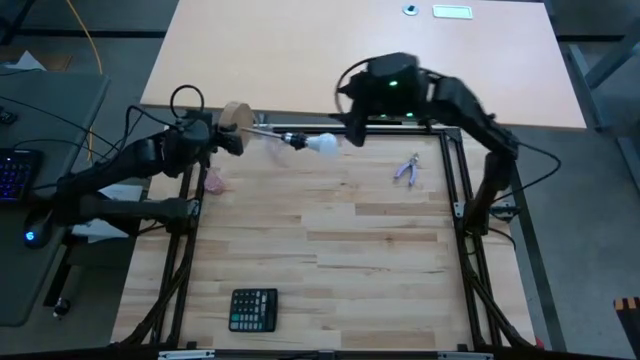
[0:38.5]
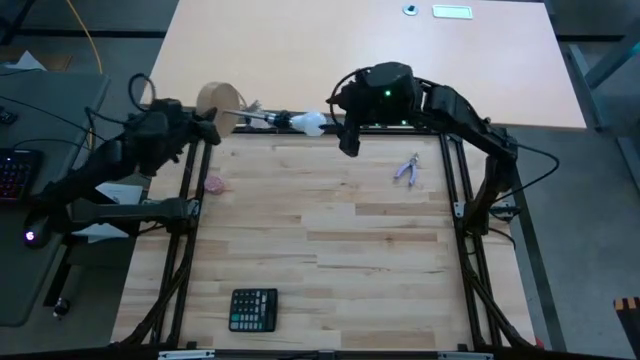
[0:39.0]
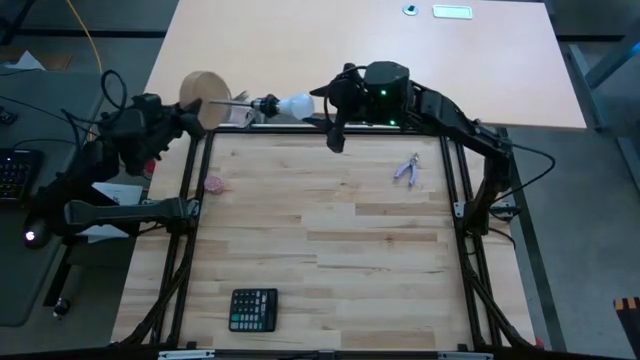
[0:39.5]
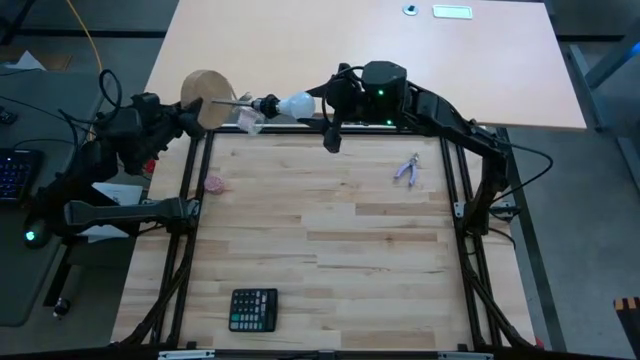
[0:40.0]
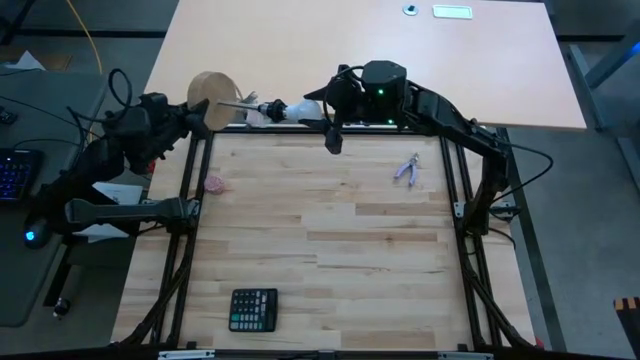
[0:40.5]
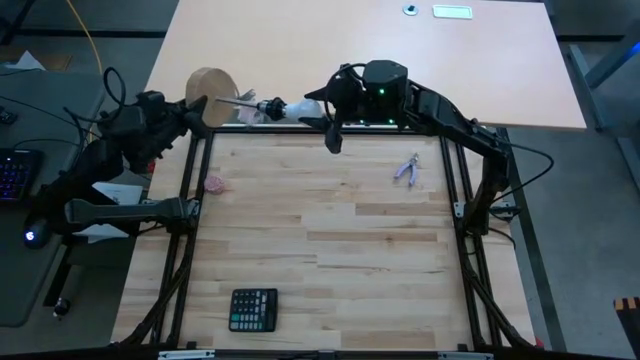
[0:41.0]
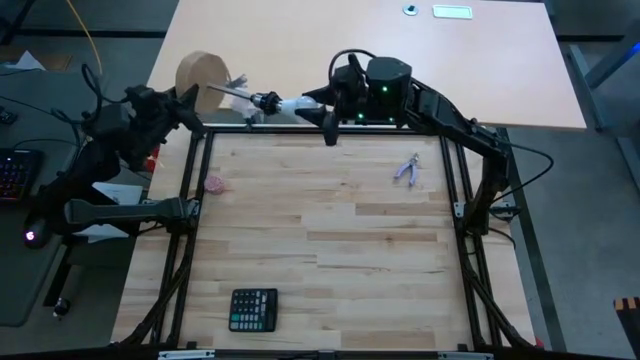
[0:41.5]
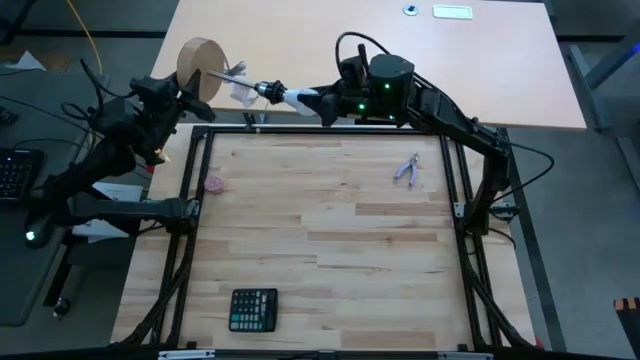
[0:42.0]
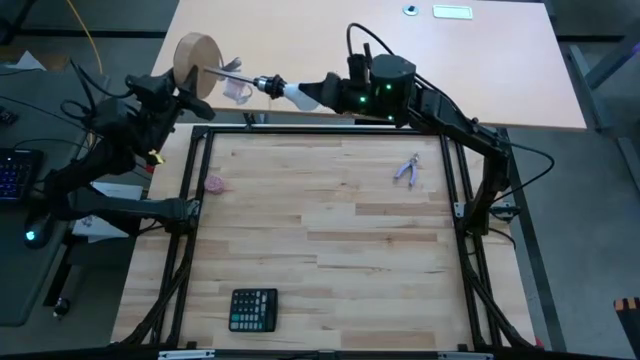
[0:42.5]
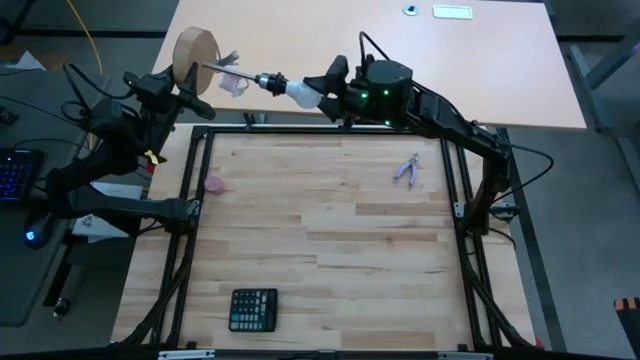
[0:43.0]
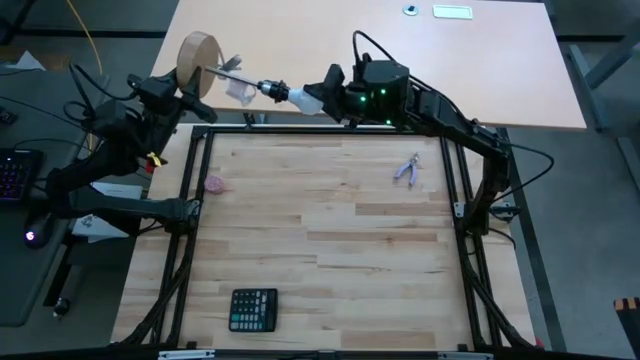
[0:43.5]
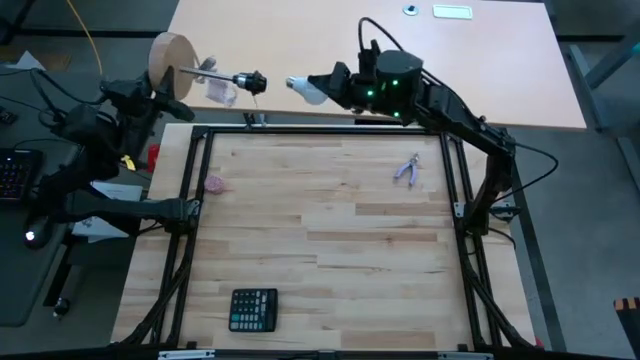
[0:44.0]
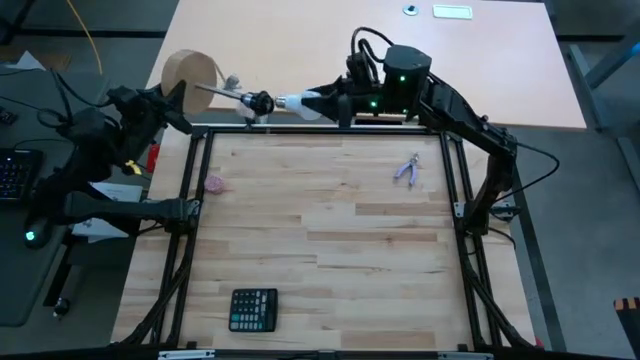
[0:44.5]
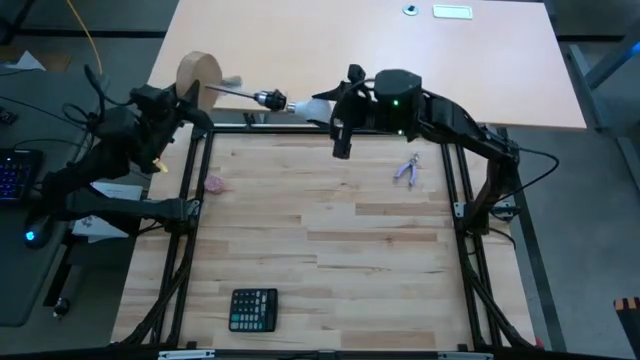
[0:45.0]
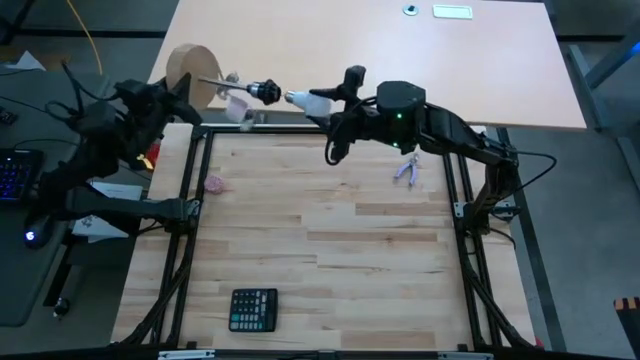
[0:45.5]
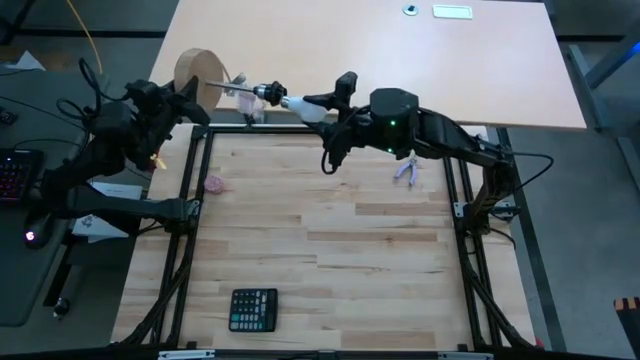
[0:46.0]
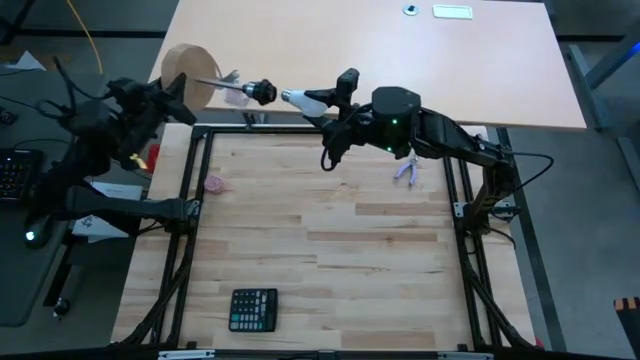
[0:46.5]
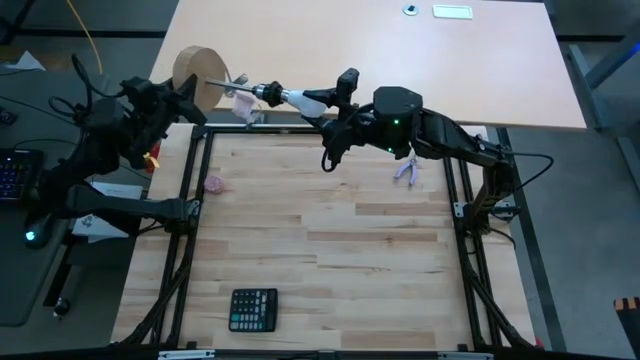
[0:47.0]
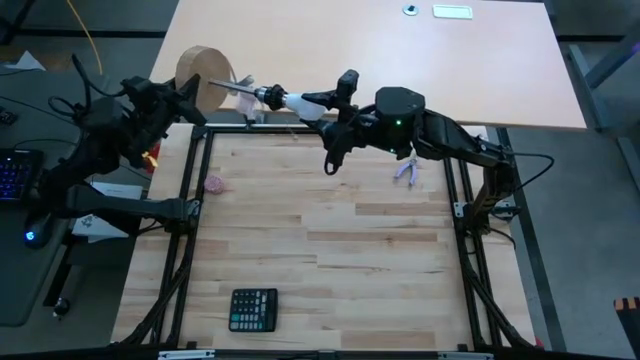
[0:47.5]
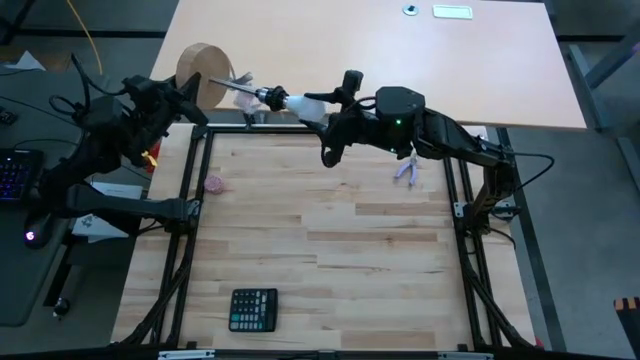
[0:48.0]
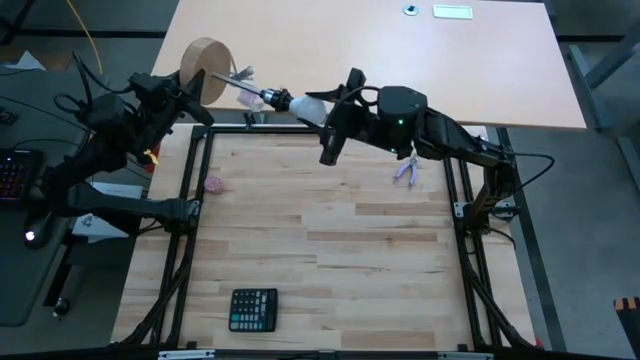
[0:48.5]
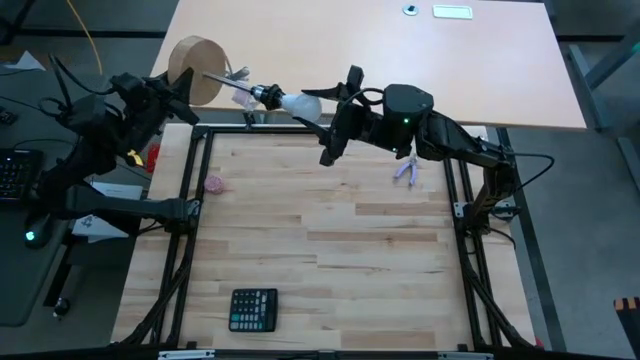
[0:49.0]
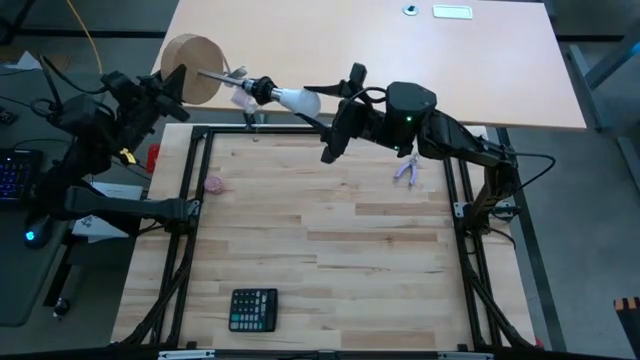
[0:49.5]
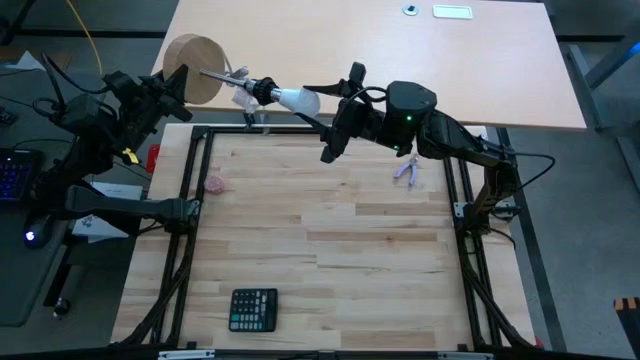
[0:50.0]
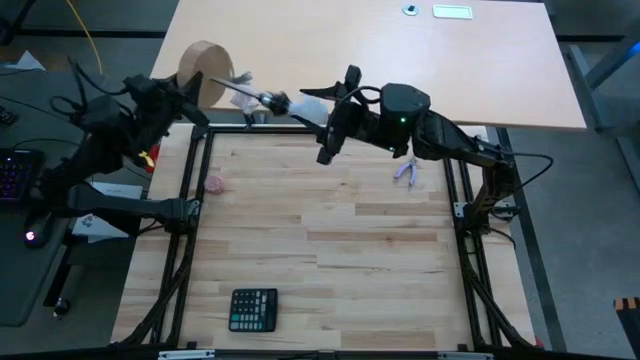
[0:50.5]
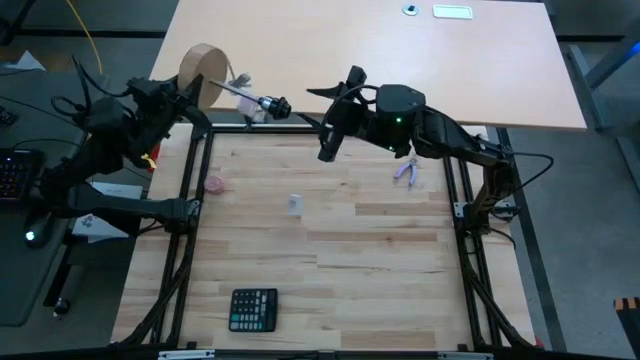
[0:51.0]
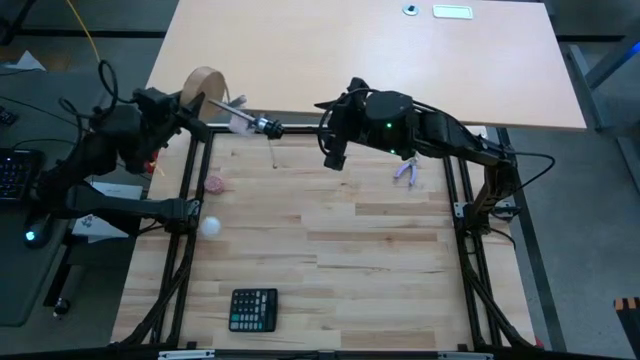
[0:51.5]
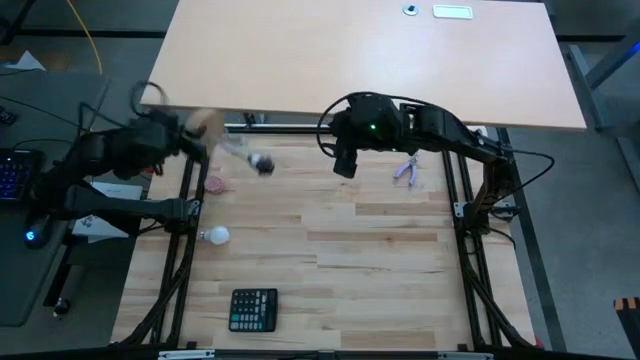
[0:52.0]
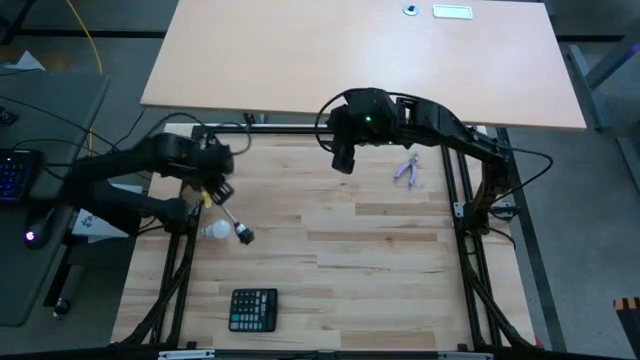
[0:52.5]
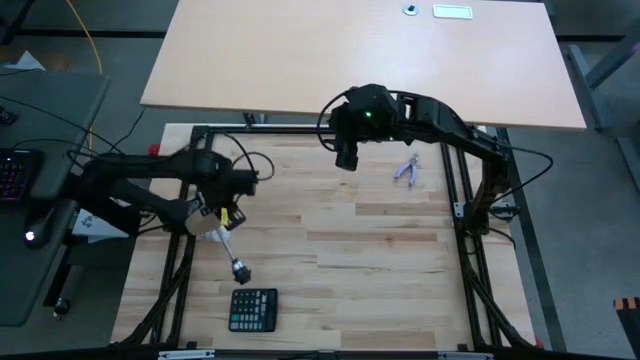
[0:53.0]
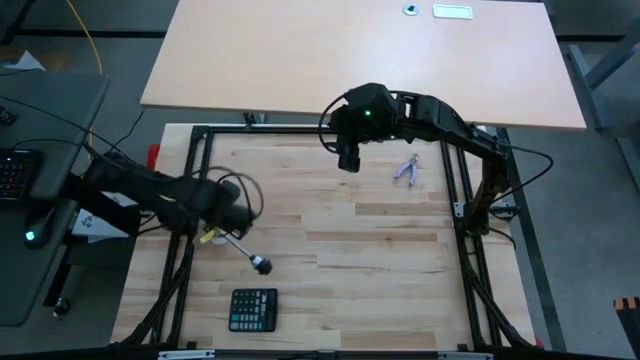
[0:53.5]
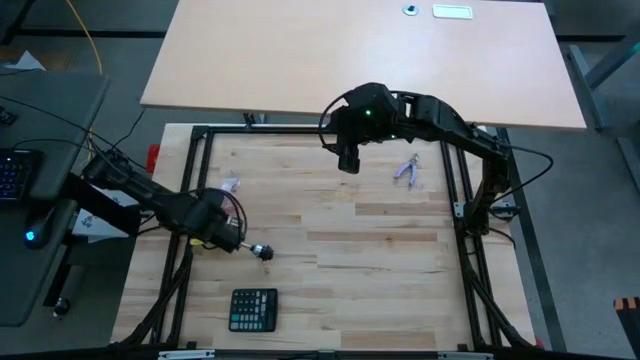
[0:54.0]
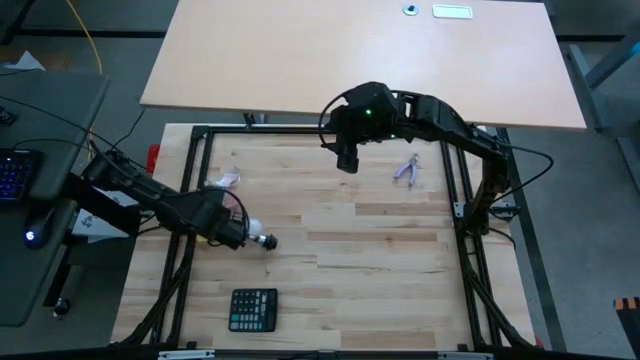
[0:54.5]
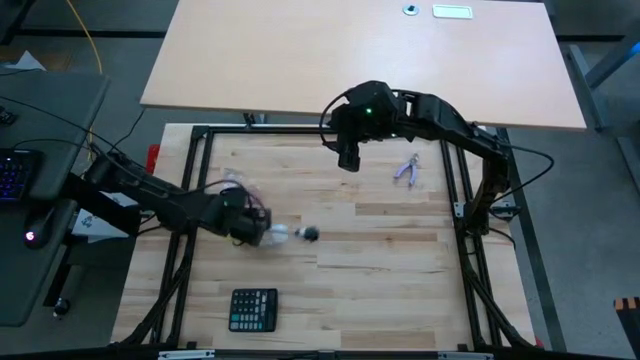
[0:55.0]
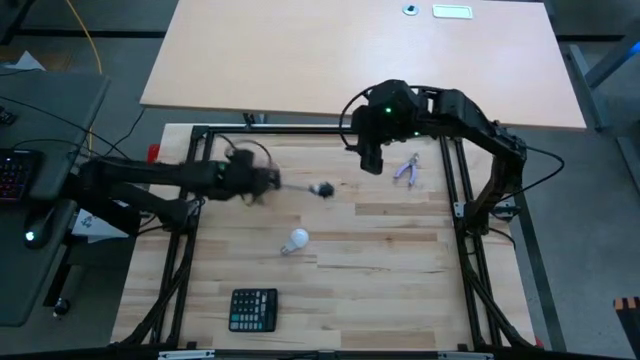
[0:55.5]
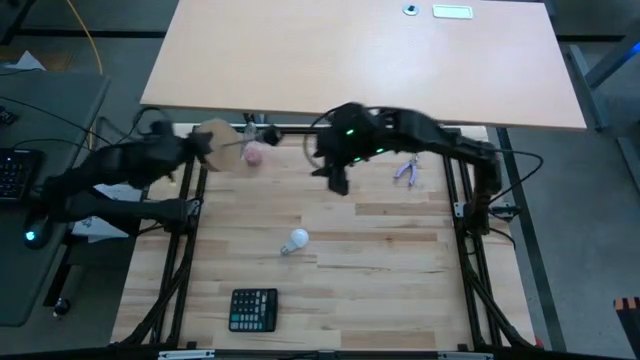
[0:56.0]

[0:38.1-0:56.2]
Task: Screw lightbulb
Insert the white lightbulb into the brown lamp

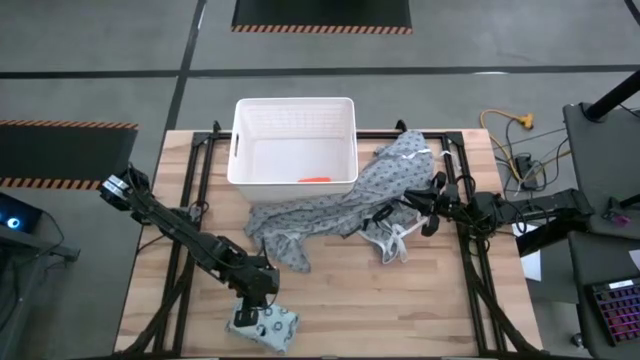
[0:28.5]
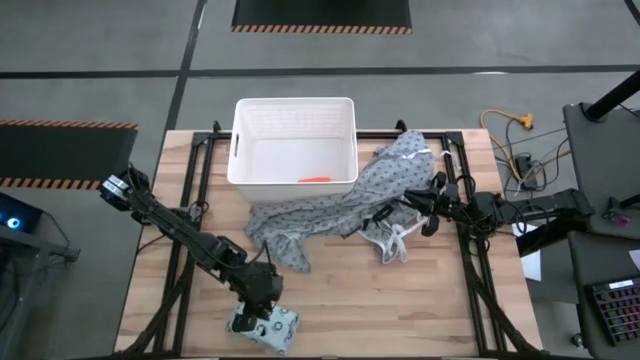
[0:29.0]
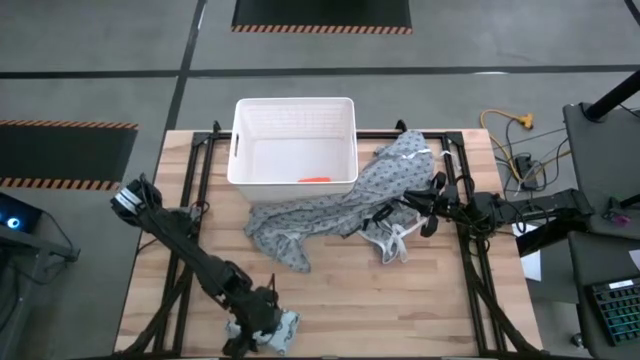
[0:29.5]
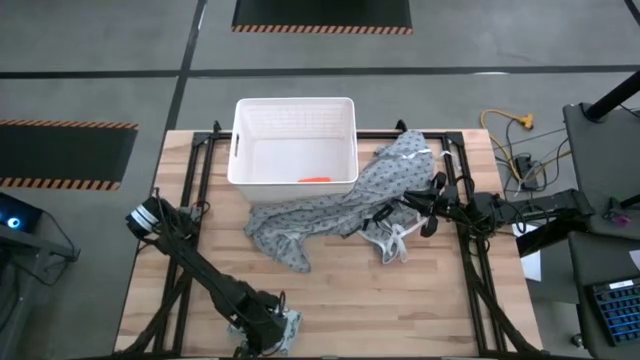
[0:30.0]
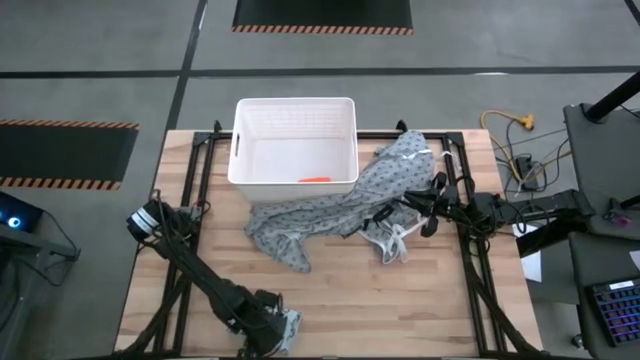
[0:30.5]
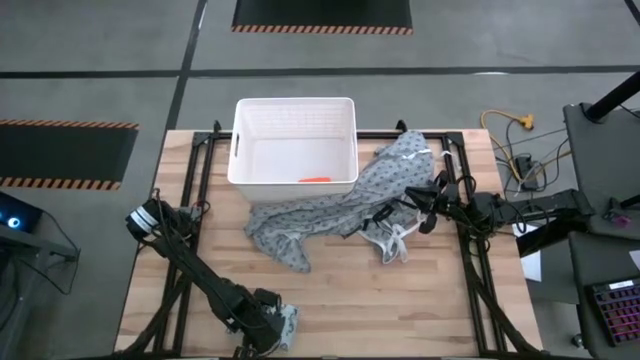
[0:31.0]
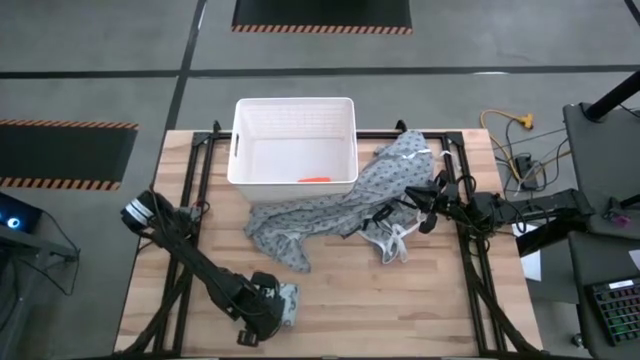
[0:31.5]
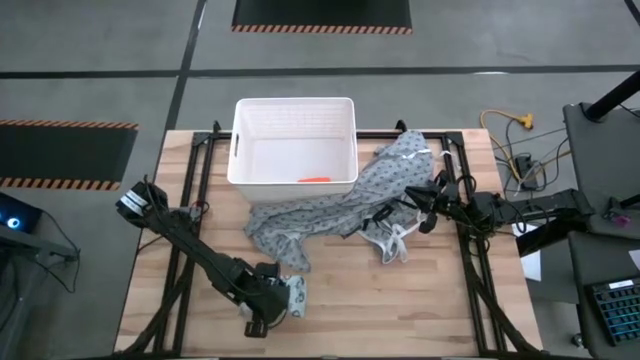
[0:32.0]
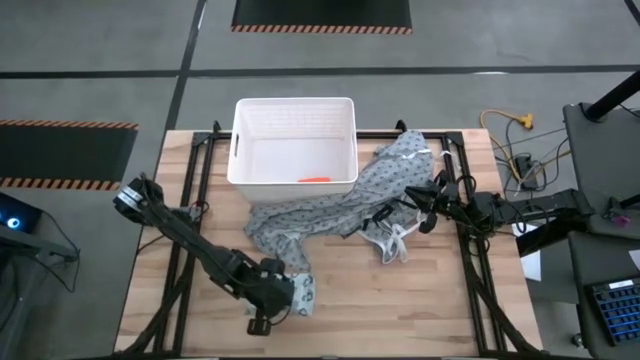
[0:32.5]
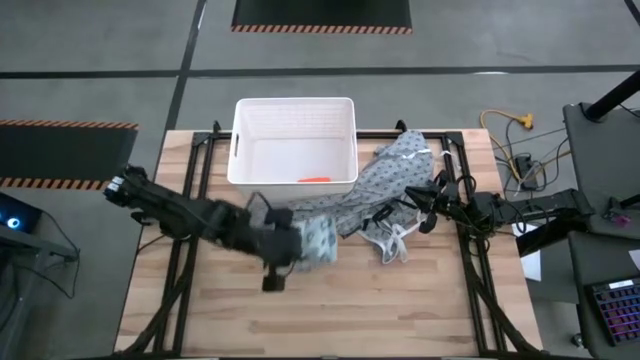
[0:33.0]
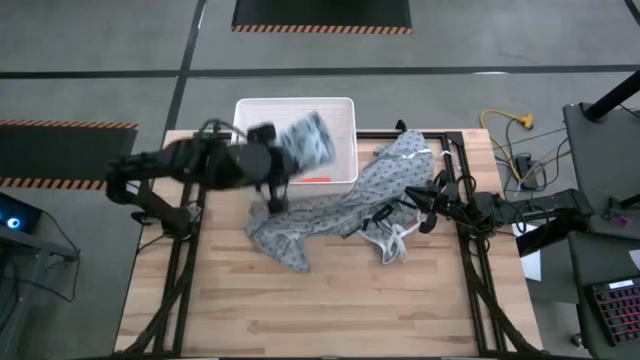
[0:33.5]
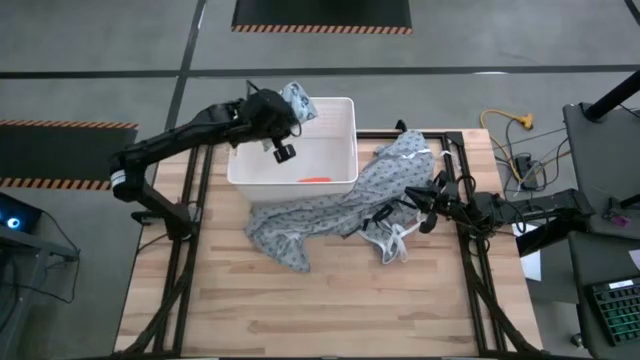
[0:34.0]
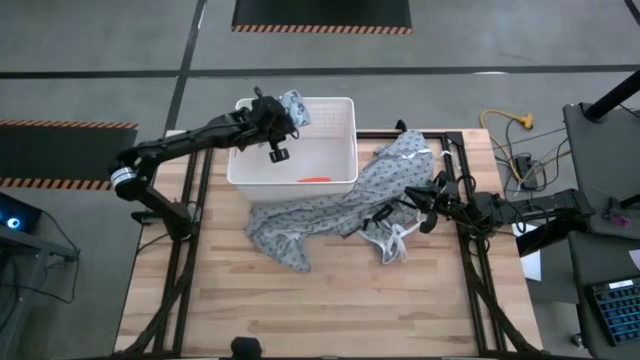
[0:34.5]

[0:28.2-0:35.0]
Task: Pick & place medical supplies in basket/bin
Put the mailer bag into the white bin
